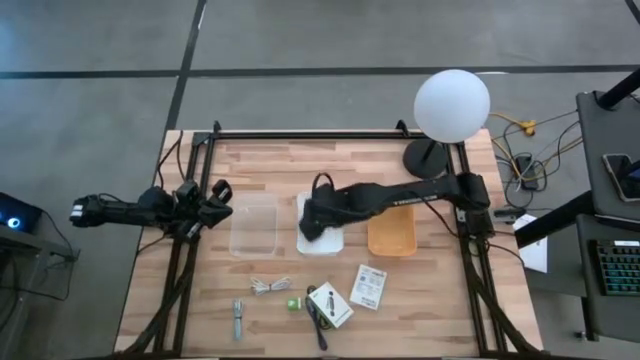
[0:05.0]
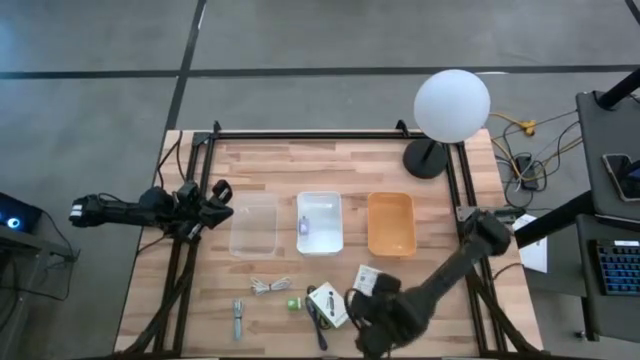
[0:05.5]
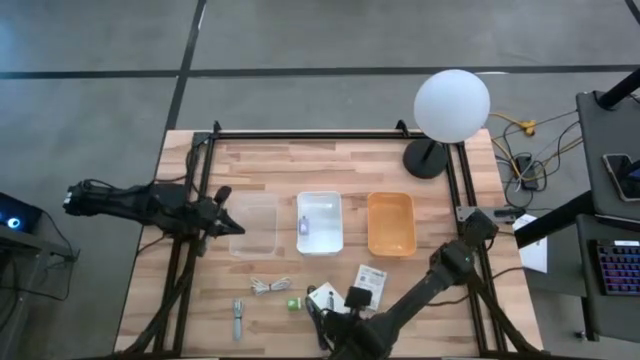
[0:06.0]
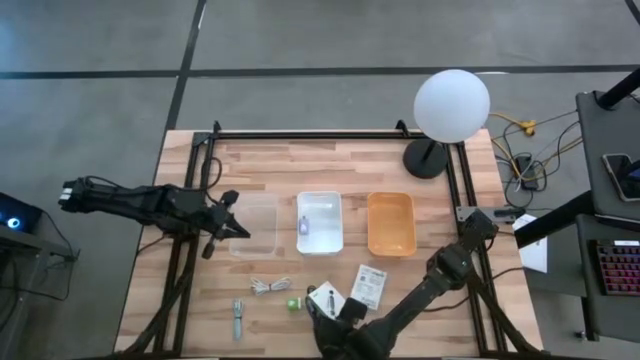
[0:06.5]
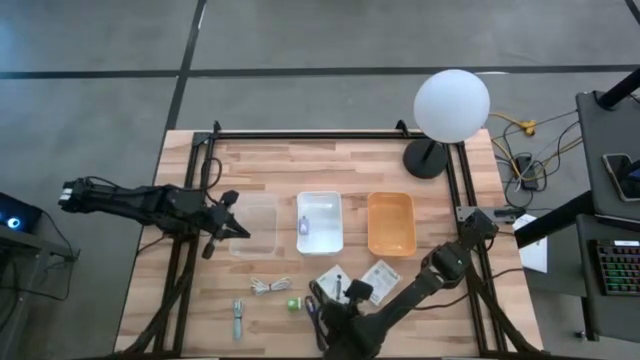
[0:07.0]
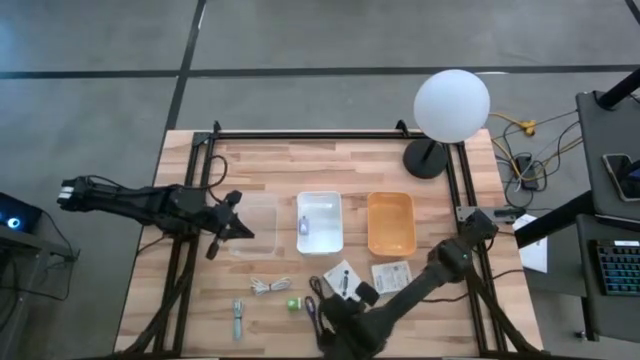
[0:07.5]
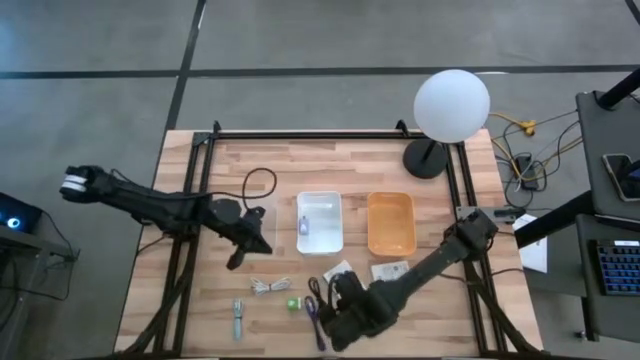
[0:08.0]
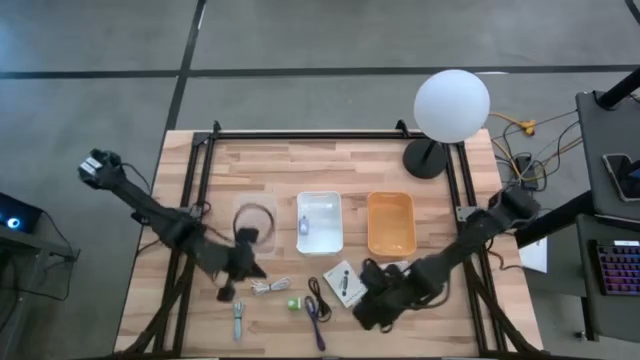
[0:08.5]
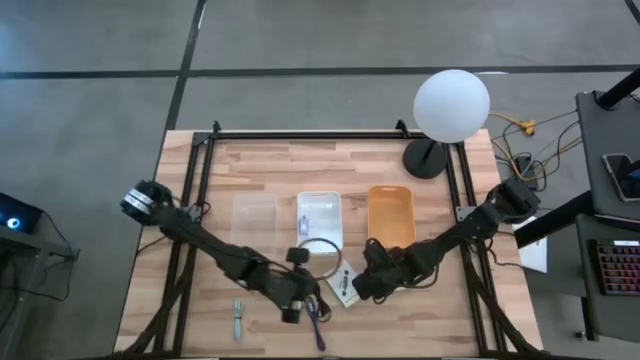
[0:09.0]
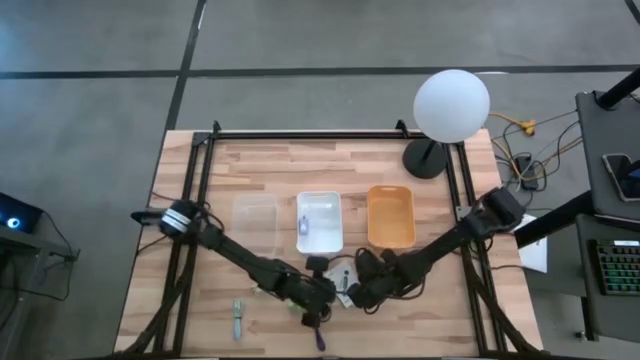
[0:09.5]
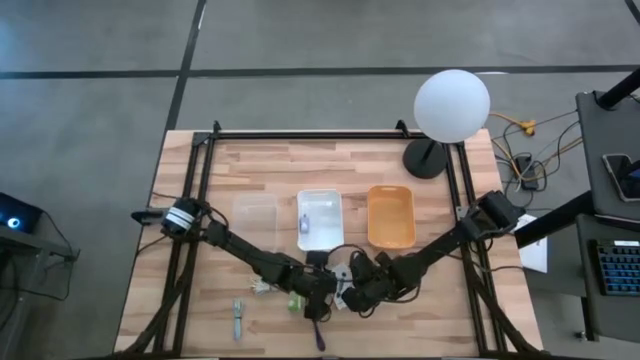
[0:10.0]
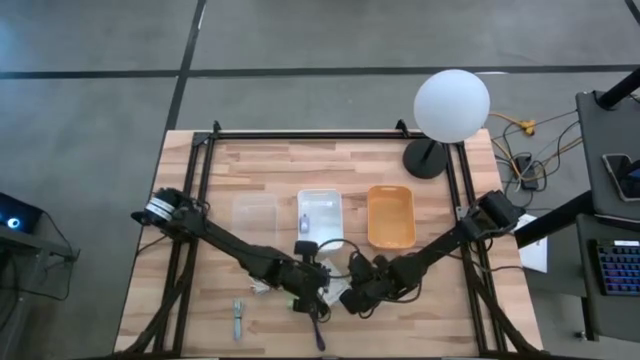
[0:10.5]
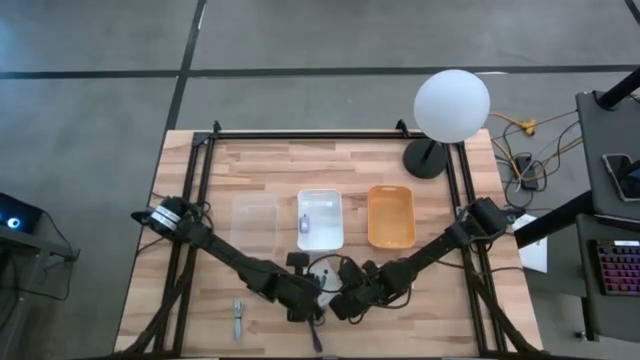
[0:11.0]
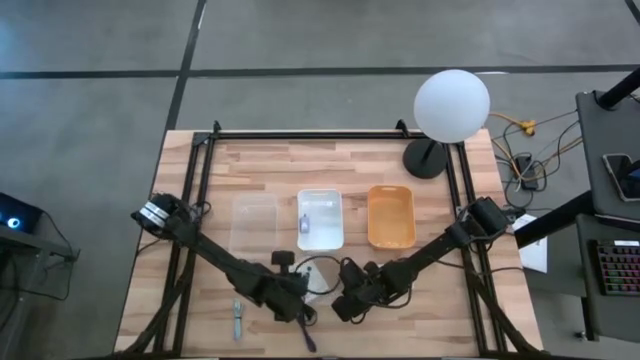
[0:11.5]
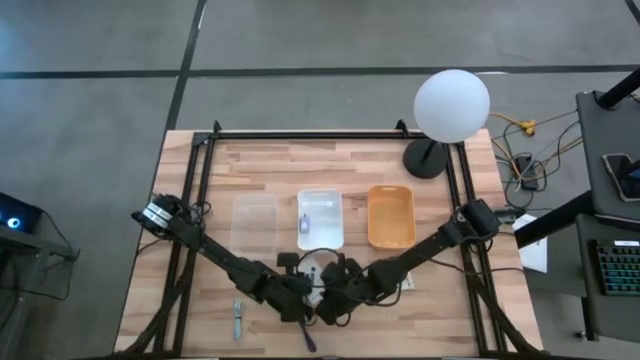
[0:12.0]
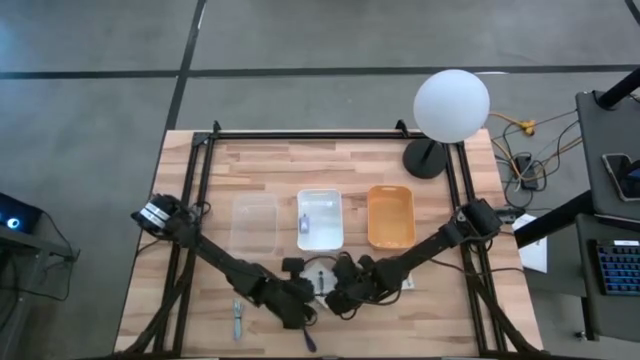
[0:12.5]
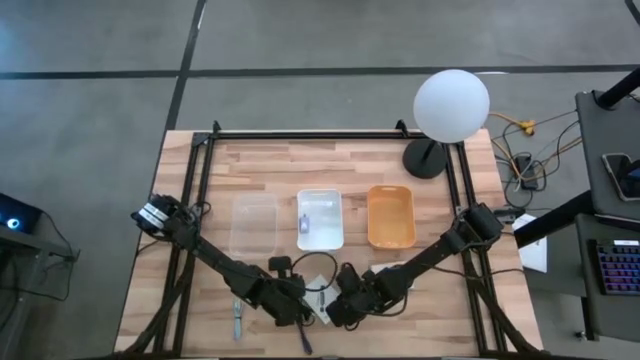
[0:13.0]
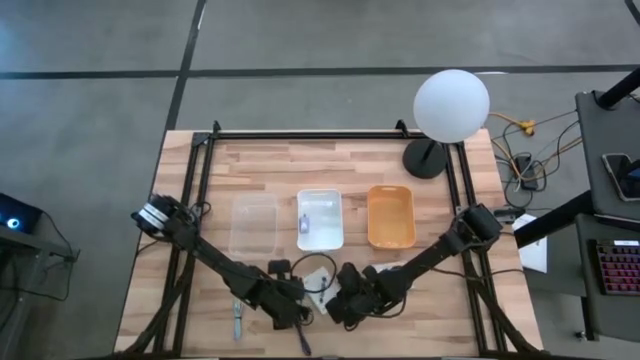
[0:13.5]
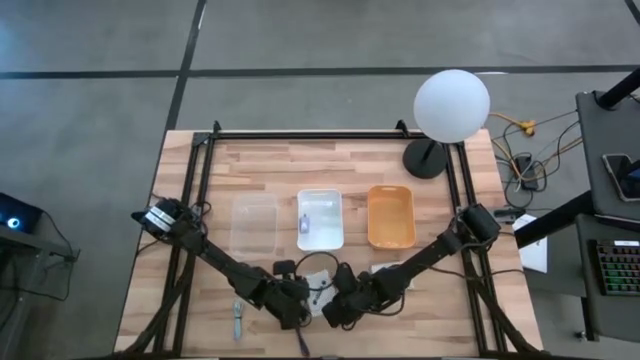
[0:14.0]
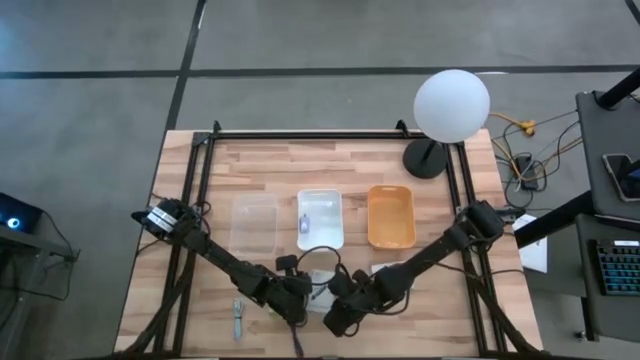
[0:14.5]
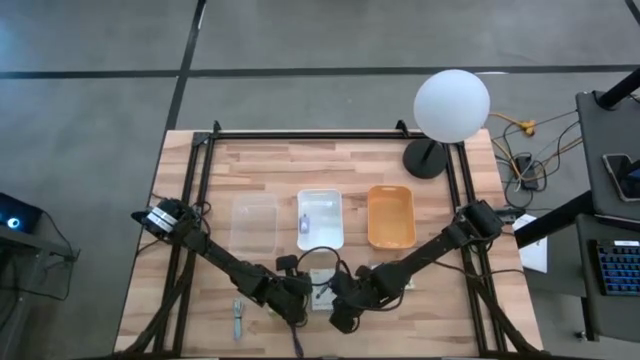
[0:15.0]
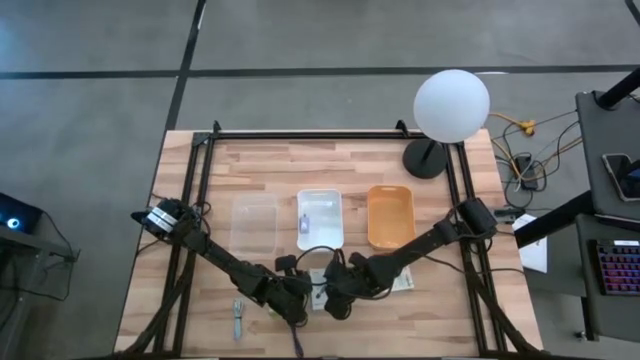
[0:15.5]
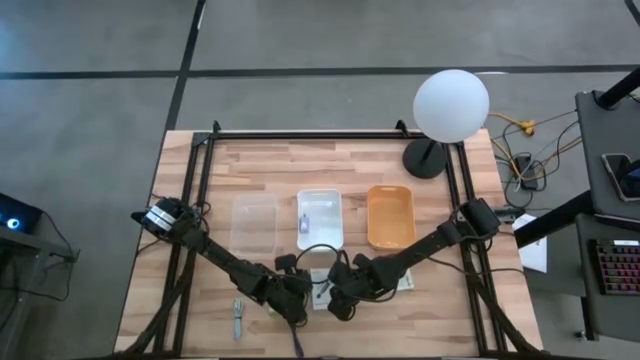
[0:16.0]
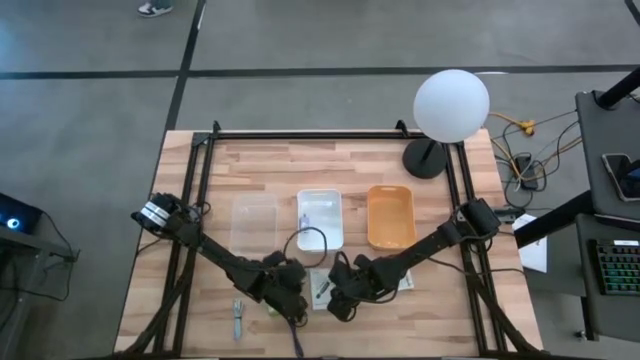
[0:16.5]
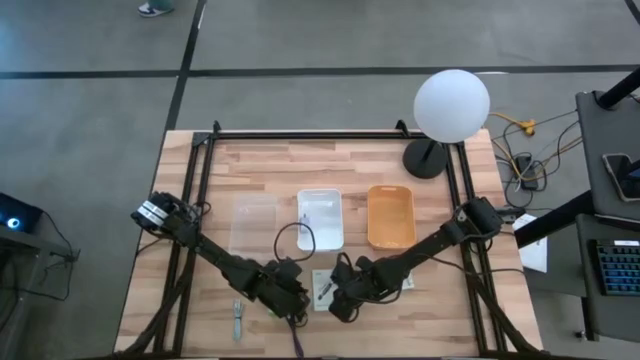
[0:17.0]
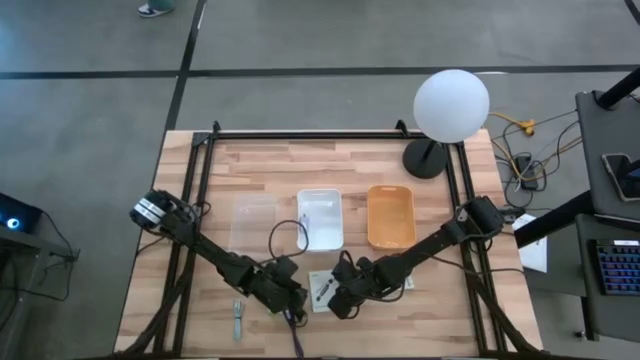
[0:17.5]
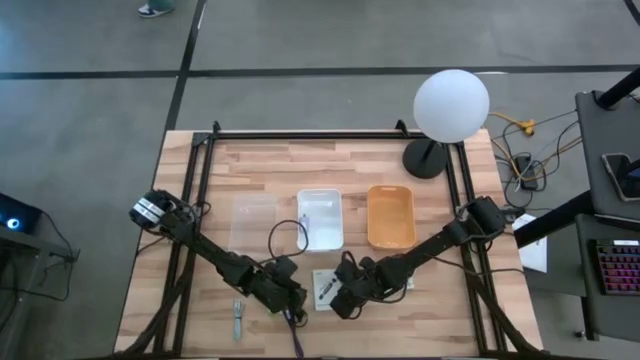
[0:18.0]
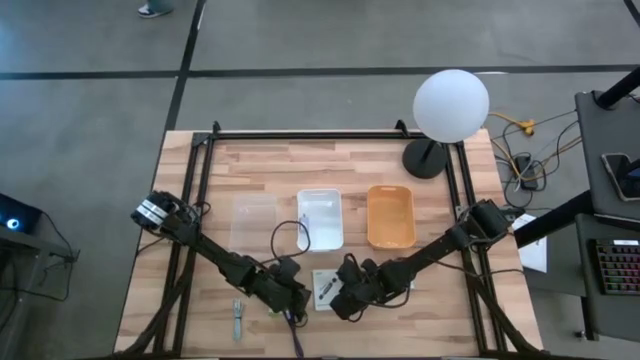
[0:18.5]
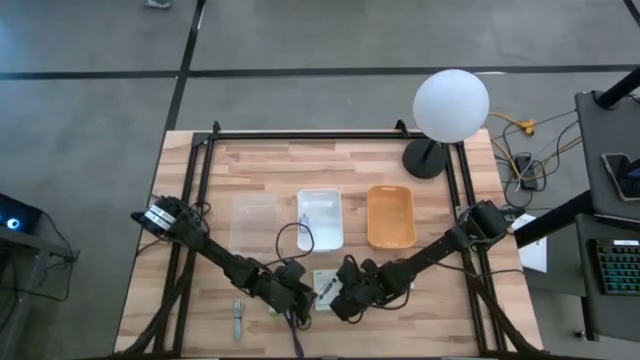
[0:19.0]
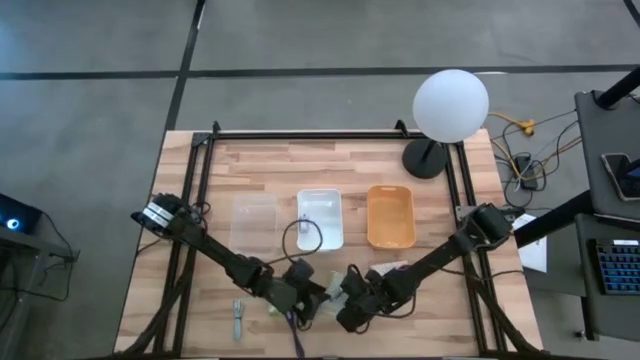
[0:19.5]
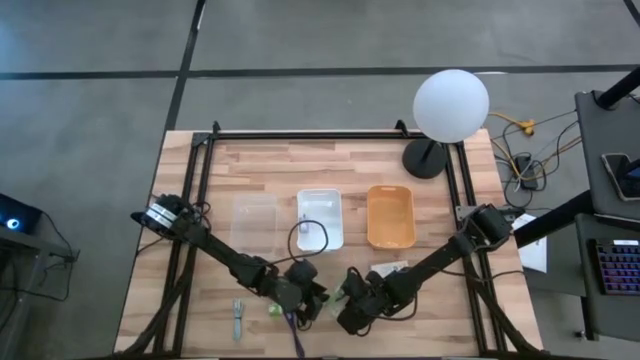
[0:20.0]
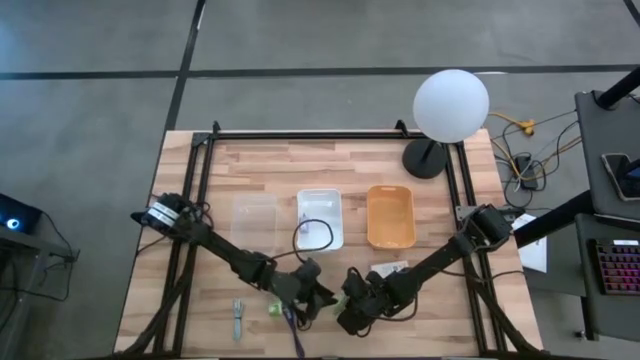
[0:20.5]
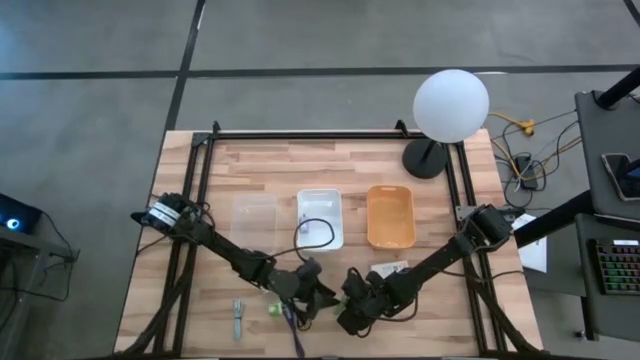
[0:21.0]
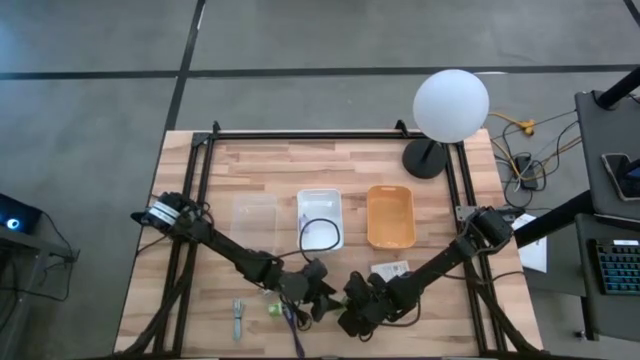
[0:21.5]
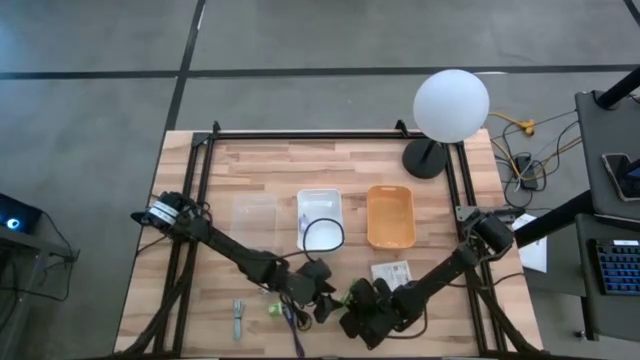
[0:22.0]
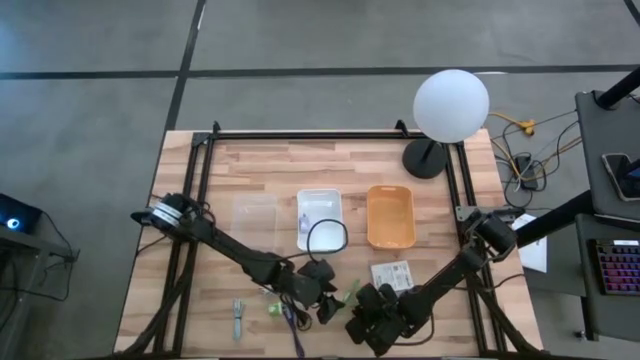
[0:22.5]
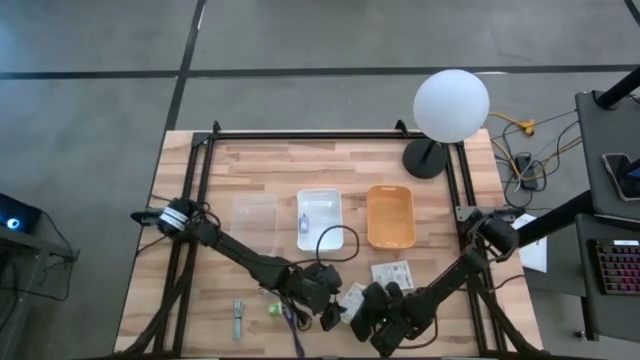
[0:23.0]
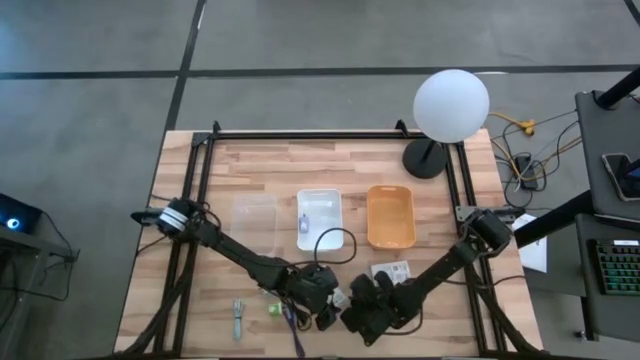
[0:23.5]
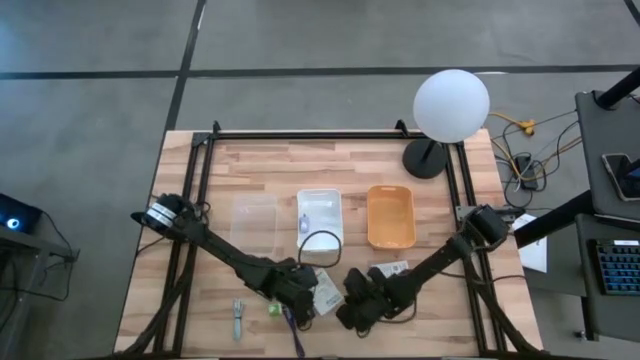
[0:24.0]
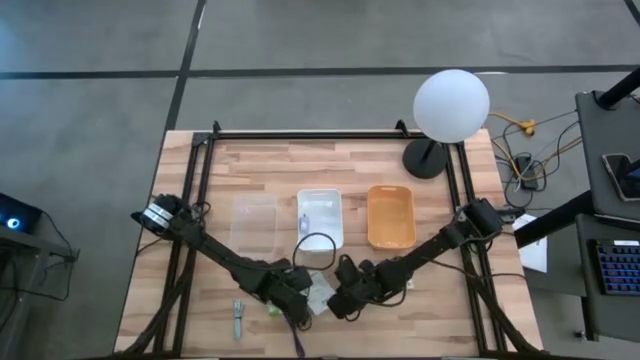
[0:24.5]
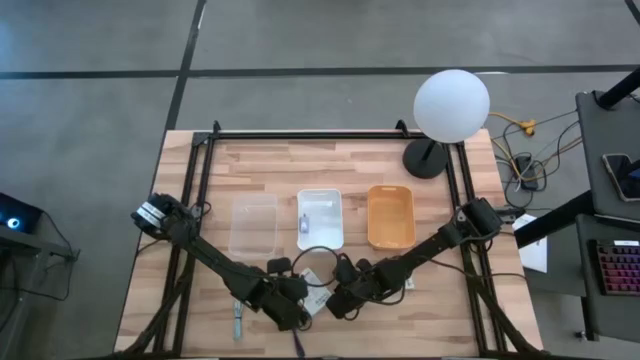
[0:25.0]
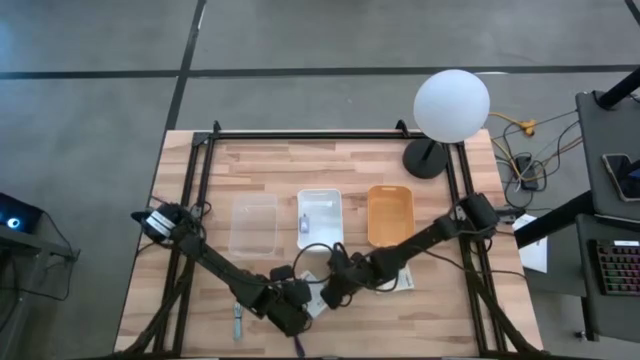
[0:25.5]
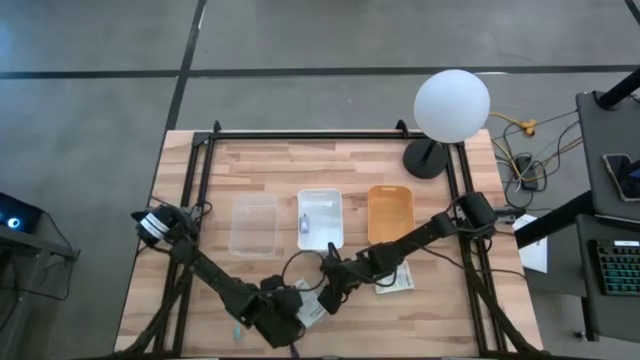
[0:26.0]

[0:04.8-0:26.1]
Task: Pick and place items into bin
Put the left white card reader box into the orange bin
